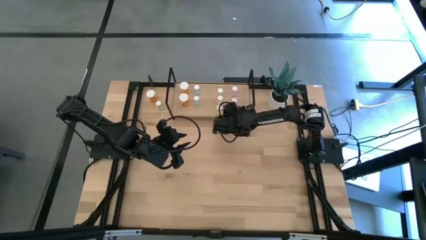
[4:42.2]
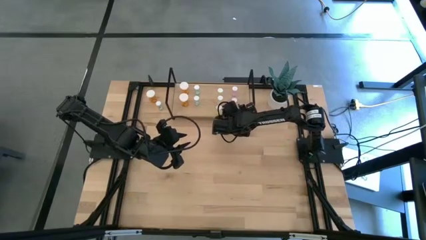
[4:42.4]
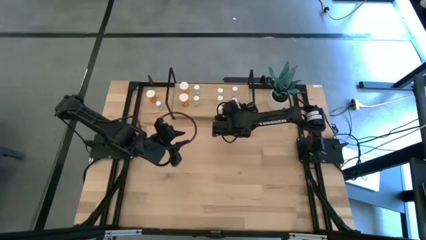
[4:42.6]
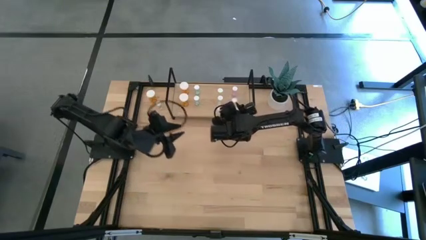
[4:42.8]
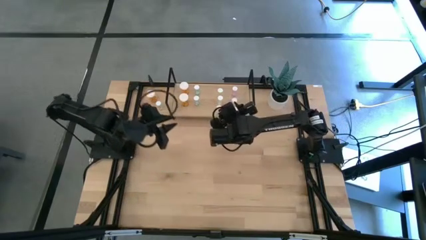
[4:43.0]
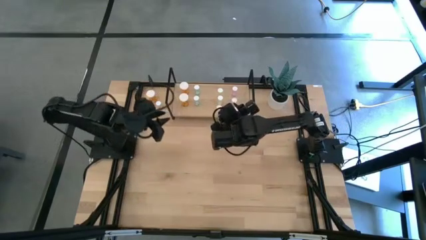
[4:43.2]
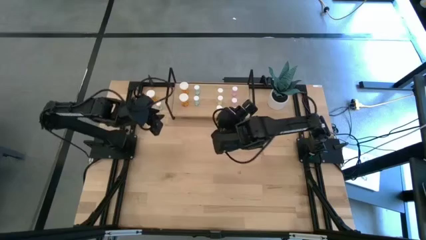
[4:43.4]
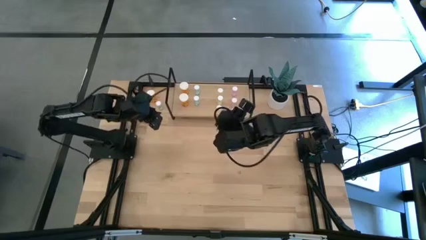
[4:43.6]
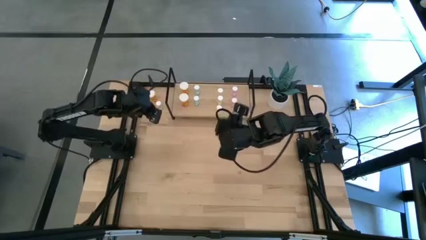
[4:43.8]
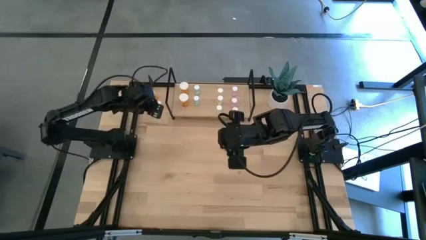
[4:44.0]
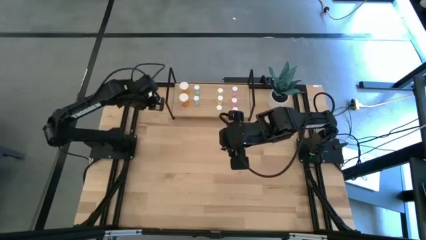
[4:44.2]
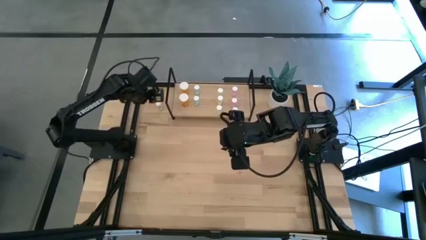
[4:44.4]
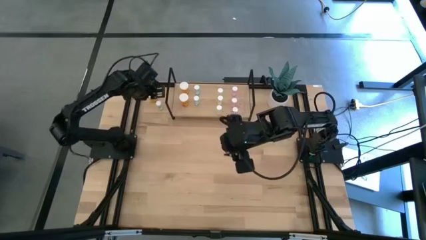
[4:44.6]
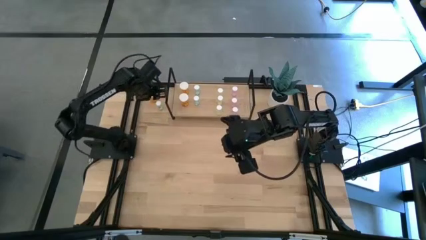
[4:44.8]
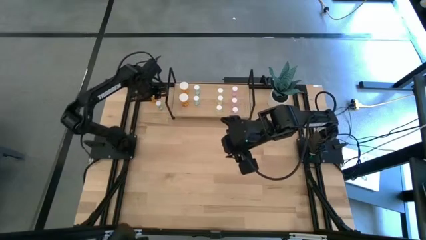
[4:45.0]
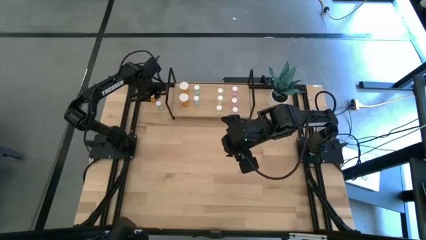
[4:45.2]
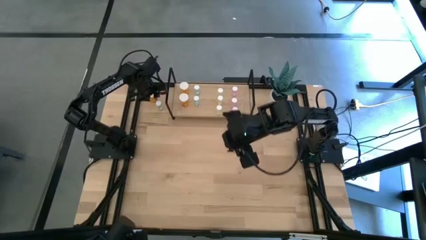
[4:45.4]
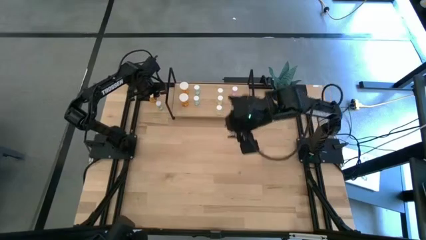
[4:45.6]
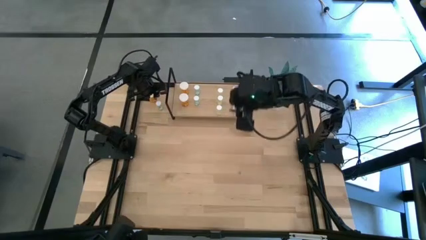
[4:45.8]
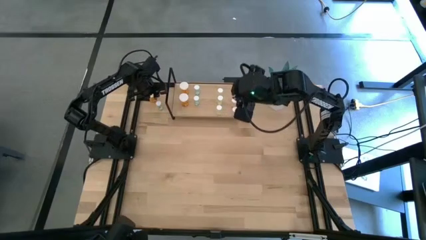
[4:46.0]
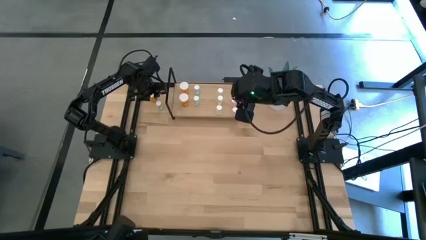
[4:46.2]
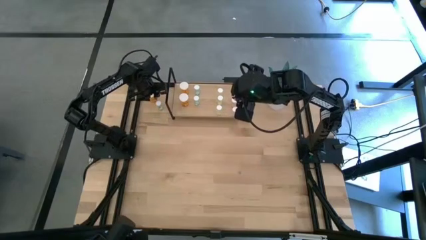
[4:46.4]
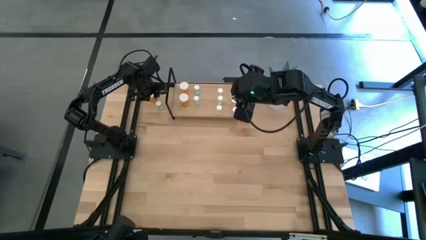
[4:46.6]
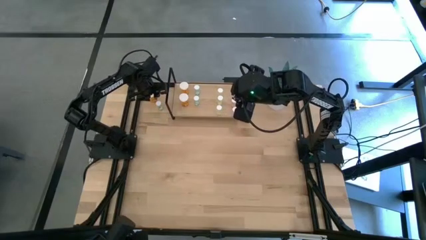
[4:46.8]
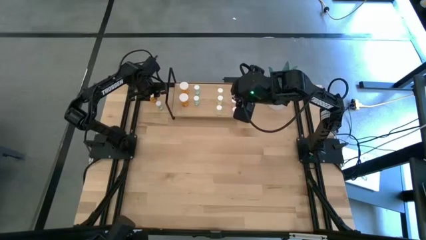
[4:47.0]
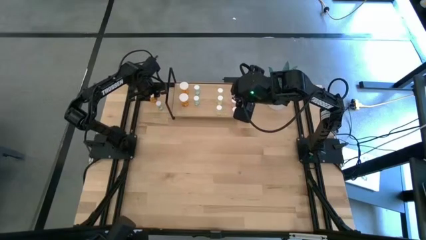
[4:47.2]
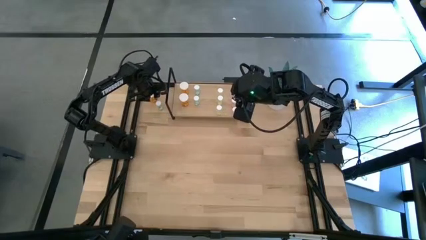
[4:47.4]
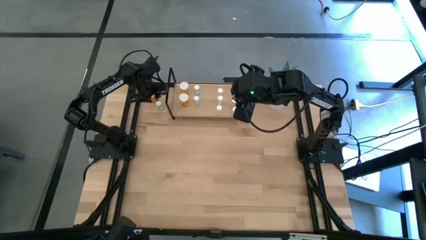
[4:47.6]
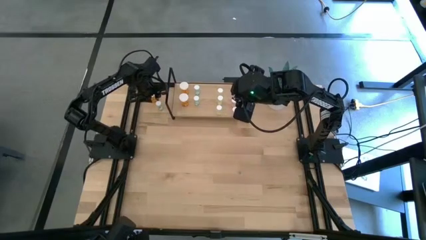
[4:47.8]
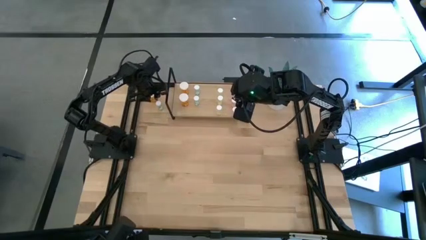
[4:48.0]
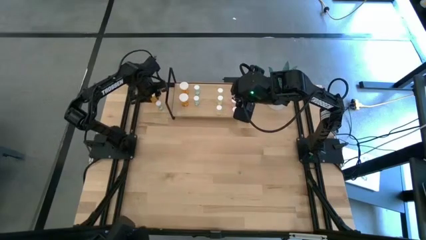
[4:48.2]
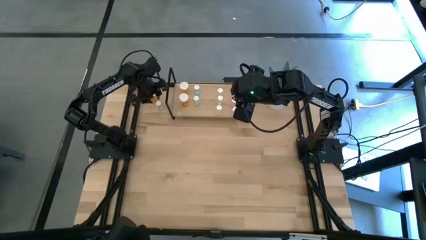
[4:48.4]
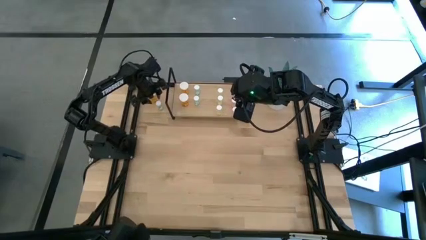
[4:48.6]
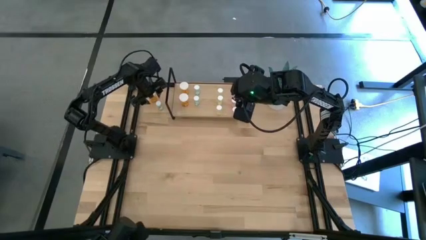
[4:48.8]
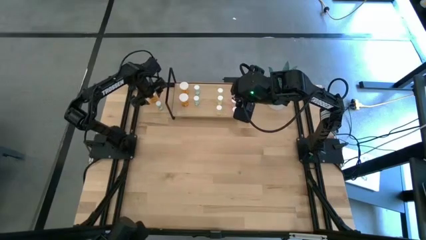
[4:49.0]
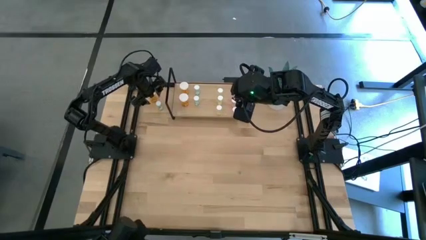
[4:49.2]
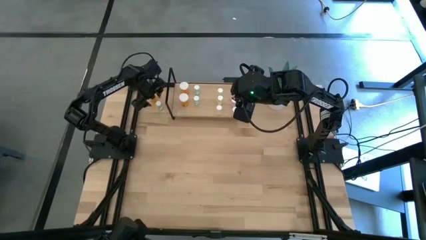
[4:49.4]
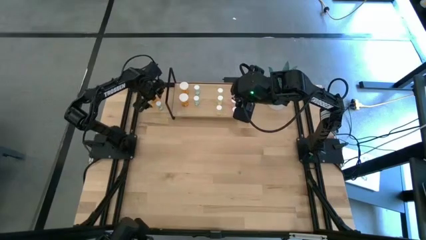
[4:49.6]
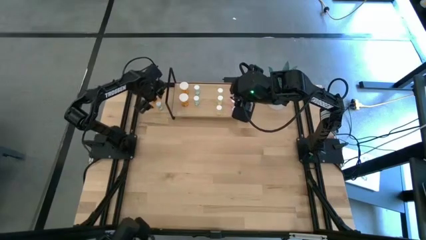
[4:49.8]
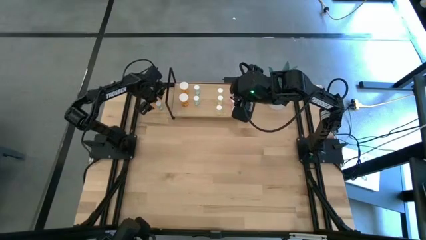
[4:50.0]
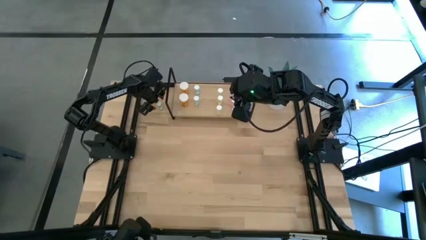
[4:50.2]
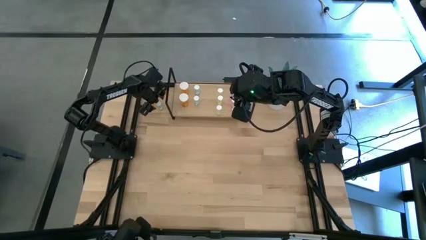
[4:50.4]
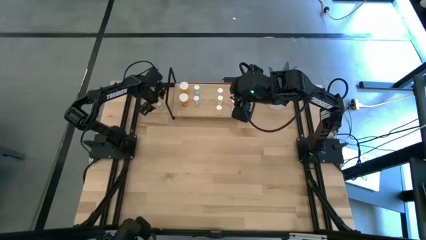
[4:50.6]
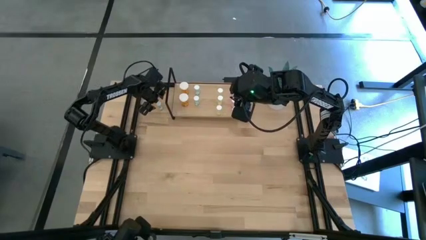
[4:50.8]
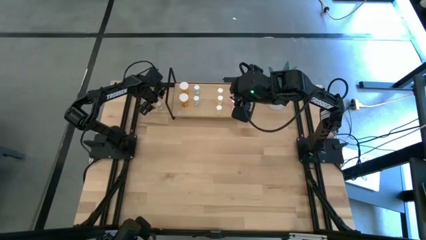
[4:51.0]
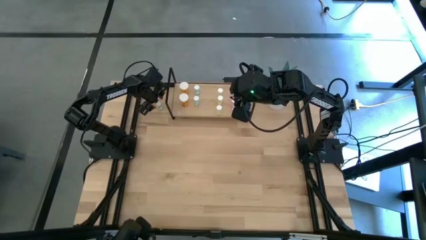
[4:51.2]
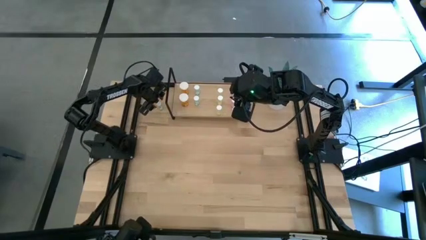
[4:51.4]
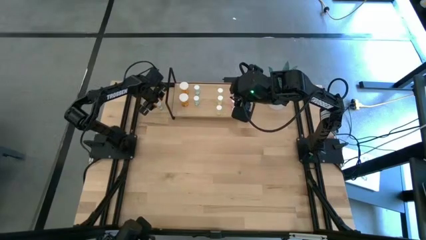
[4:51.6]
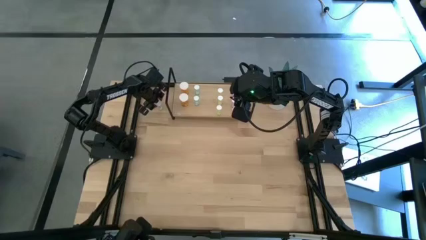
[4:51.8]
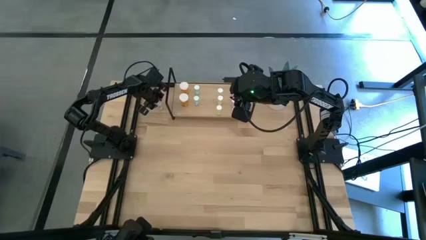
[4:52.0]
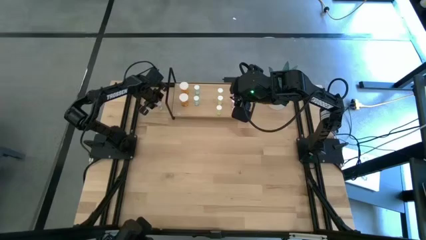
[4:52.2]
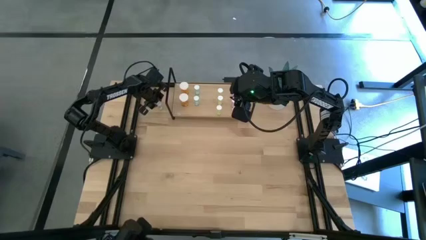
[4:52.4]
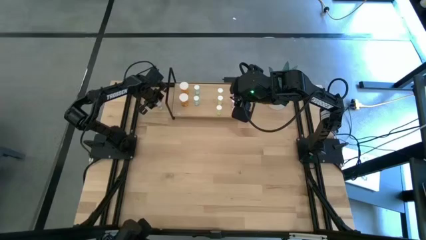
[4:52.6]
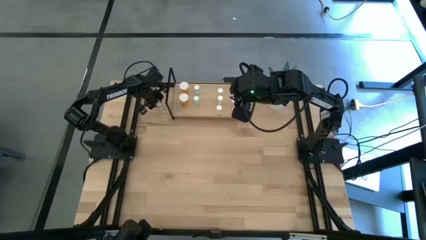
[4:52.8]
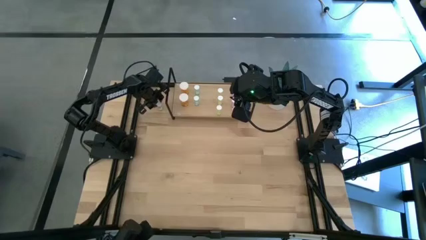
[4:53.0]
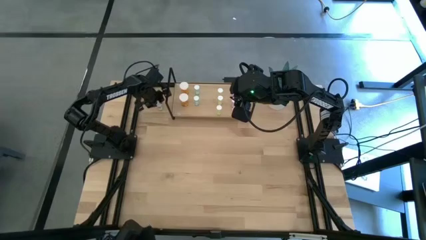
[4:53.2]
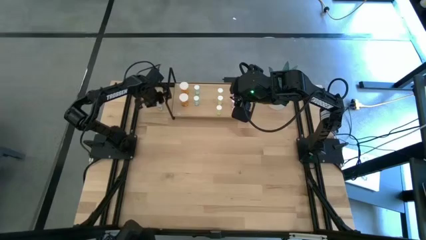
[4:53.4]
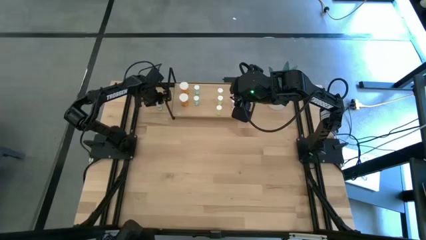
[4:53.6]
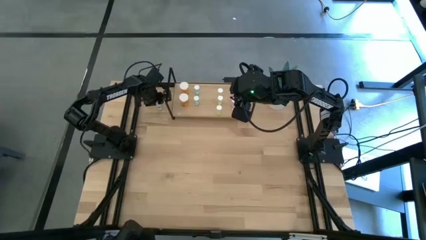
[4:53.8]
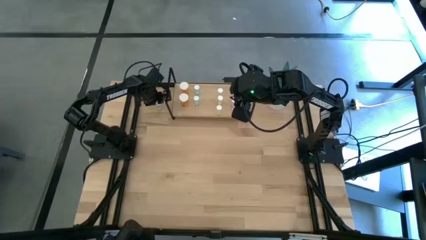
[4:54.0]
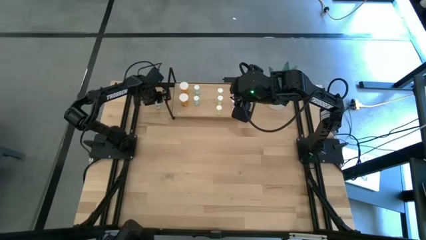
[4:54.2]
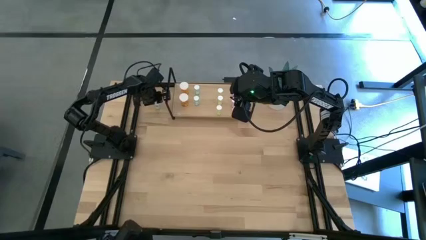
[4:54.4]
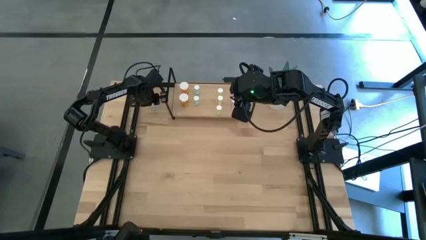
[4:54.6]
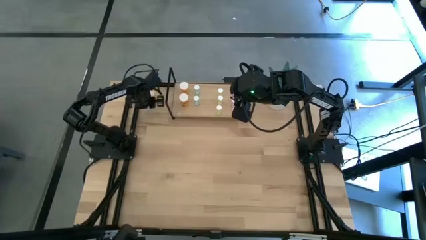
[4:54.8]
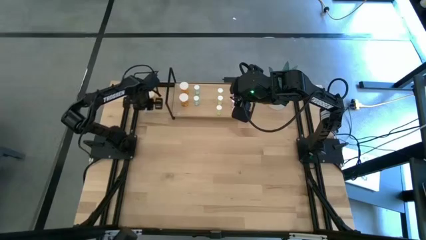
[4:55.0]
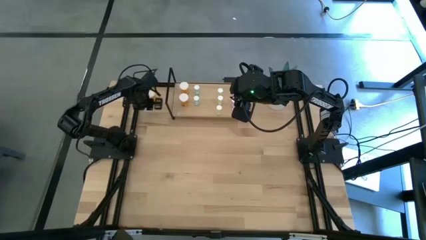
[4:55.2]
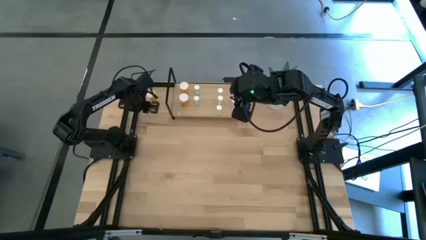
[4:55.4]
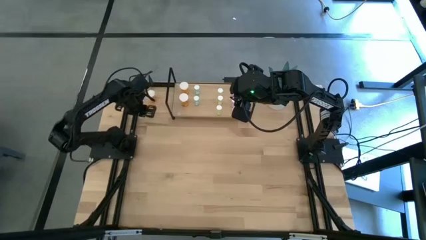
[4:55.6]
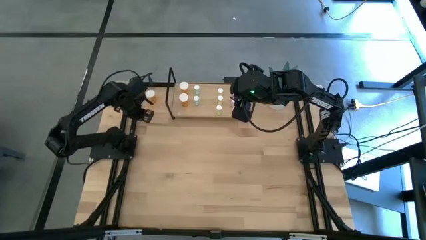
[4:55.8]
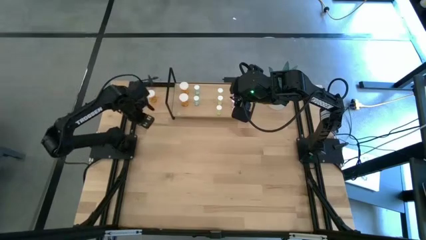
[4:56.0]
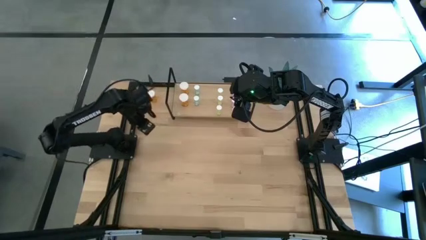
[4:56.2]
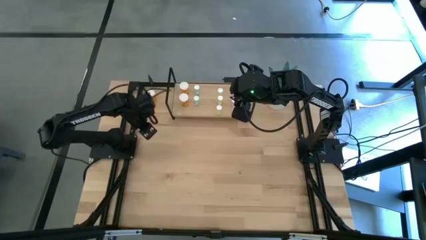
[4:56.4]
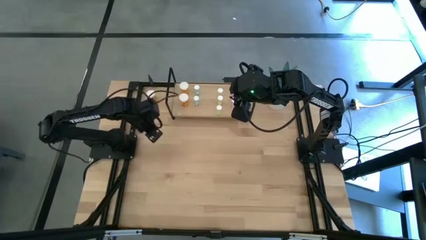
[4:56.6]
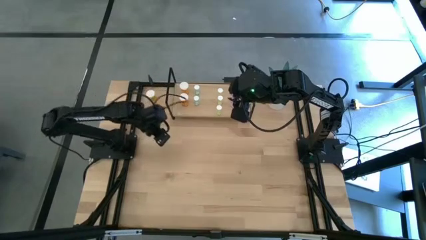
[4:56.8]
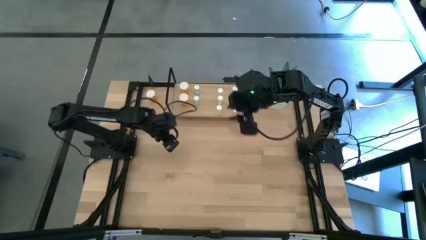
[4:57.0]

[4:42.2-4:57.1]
Task: Pick and place medicine bottles onto shelf by color
Put the blue pill bottle on the shelf aligned with the other blue pill bottles
